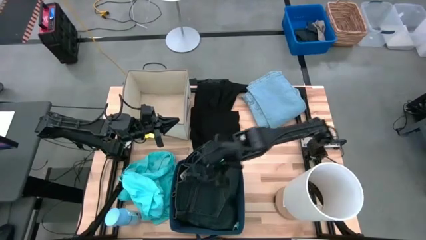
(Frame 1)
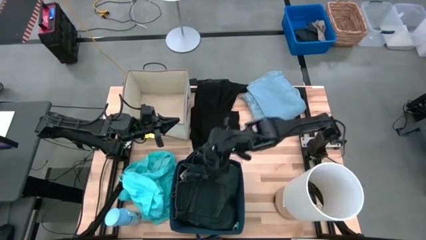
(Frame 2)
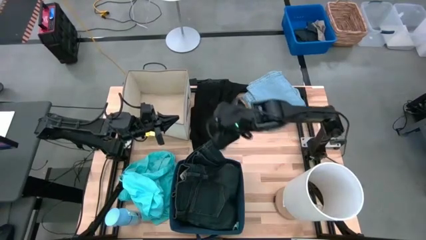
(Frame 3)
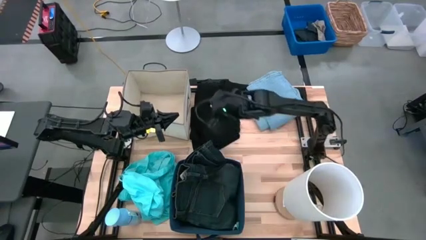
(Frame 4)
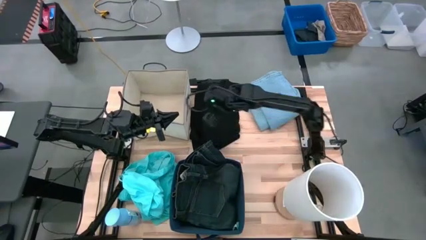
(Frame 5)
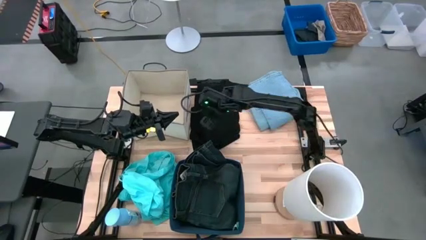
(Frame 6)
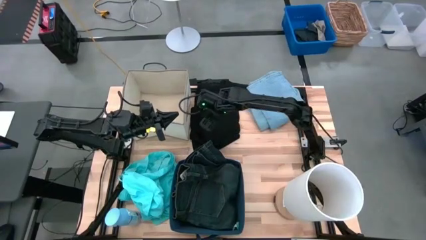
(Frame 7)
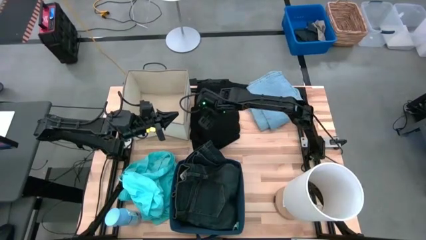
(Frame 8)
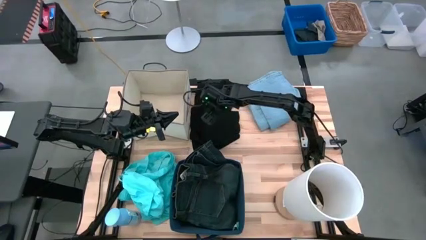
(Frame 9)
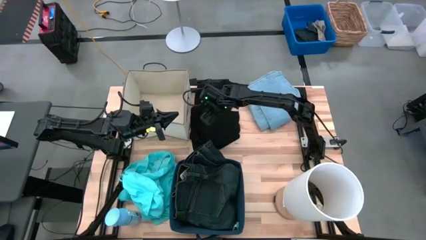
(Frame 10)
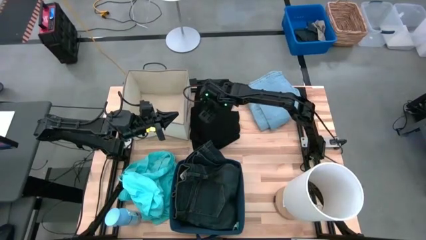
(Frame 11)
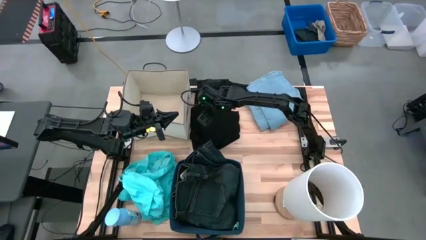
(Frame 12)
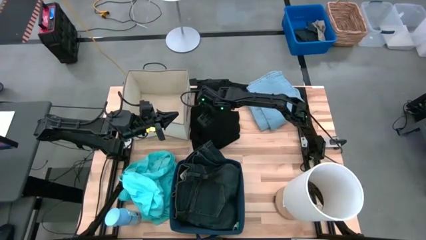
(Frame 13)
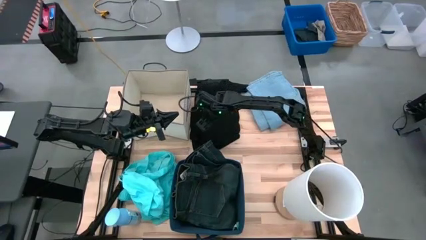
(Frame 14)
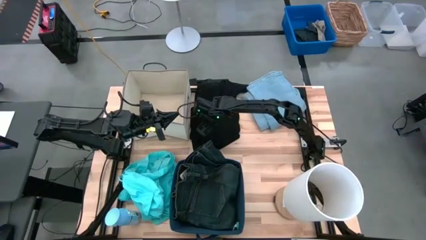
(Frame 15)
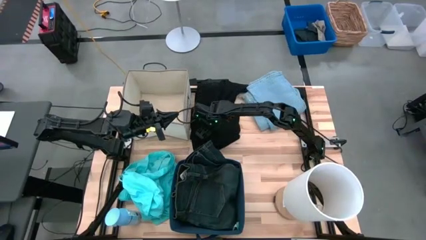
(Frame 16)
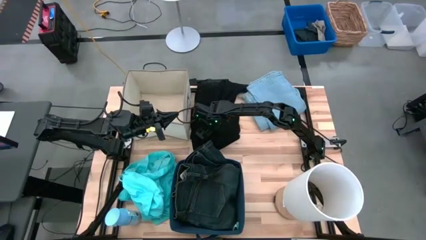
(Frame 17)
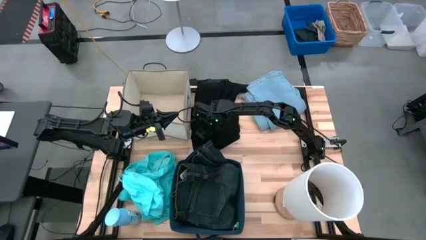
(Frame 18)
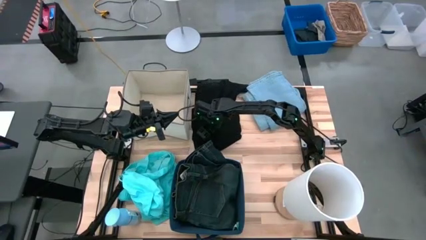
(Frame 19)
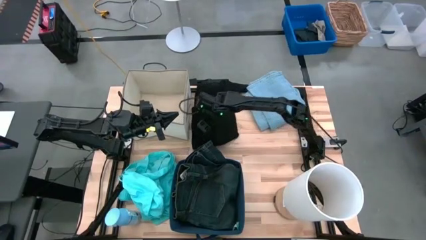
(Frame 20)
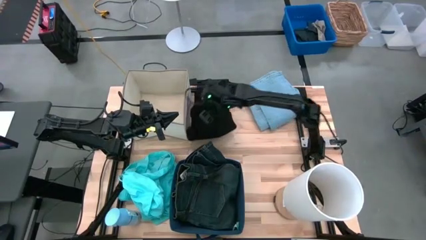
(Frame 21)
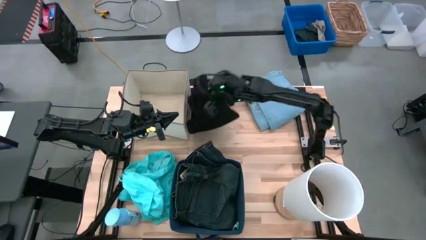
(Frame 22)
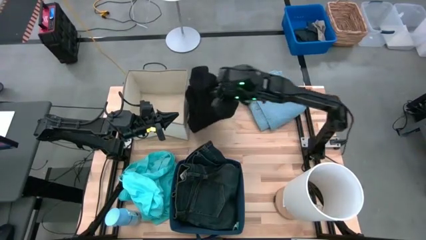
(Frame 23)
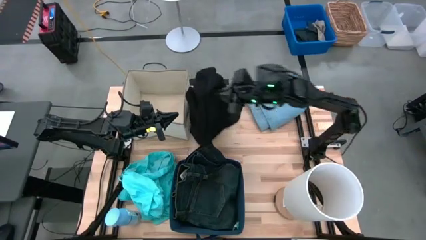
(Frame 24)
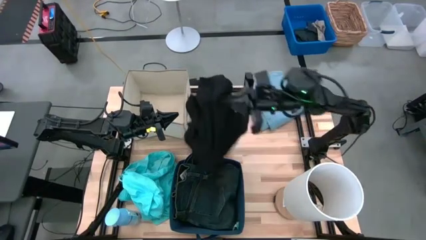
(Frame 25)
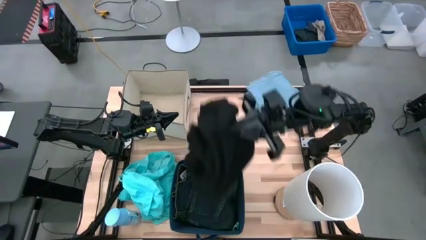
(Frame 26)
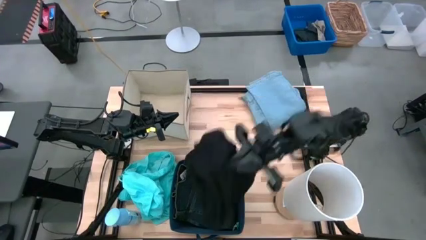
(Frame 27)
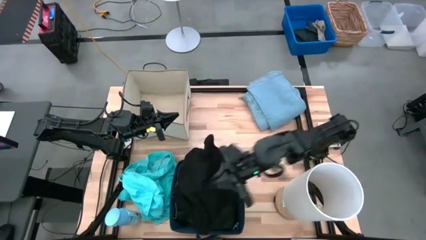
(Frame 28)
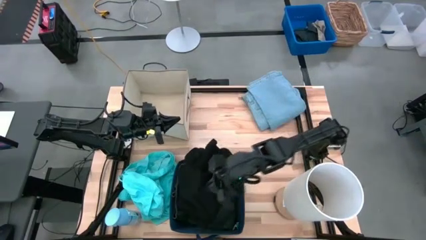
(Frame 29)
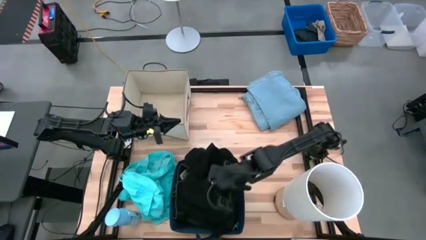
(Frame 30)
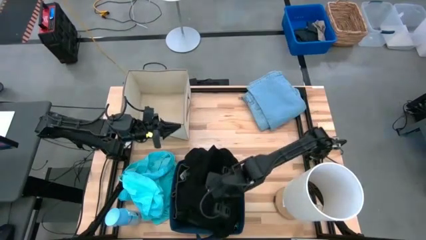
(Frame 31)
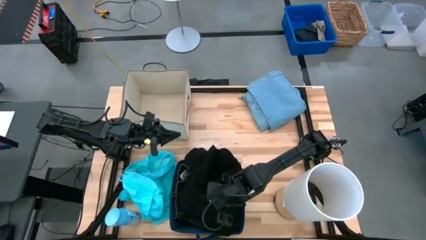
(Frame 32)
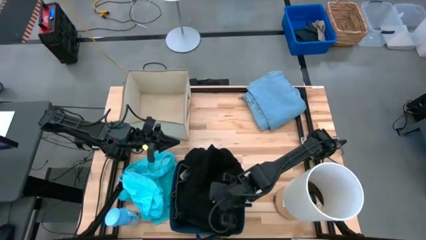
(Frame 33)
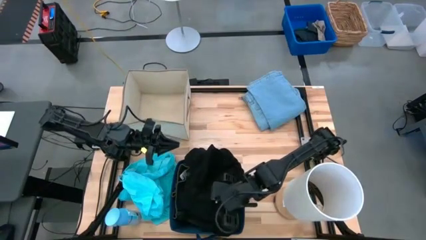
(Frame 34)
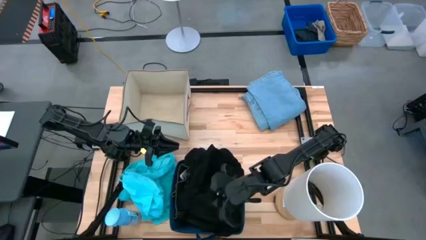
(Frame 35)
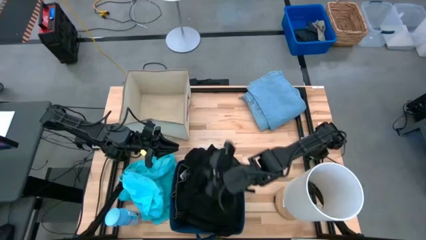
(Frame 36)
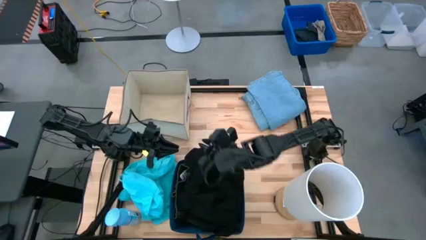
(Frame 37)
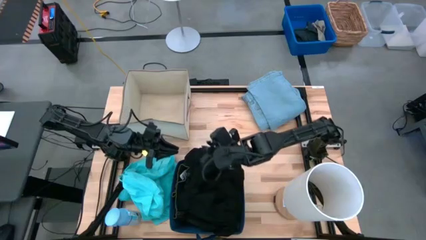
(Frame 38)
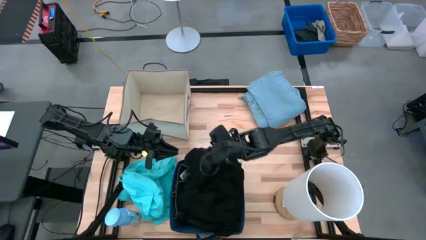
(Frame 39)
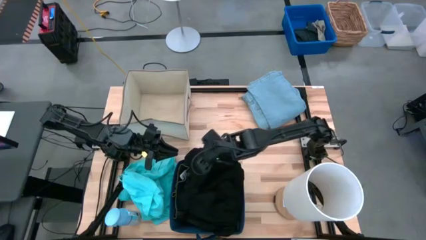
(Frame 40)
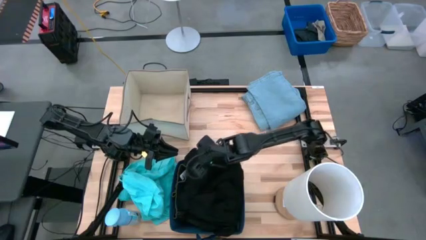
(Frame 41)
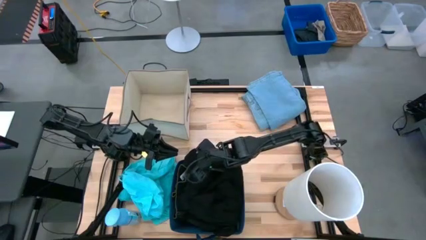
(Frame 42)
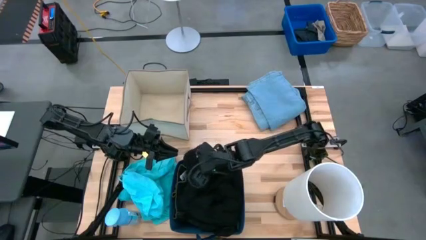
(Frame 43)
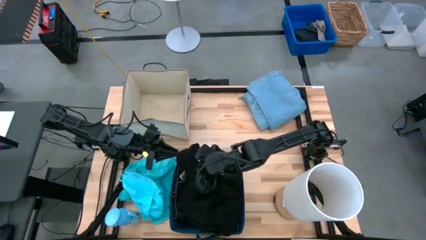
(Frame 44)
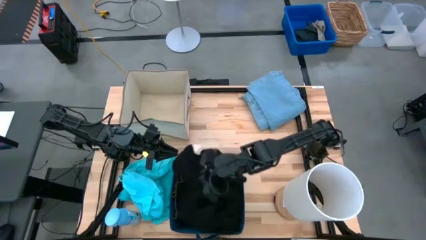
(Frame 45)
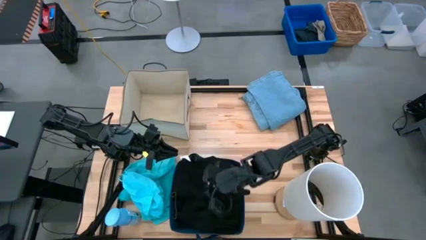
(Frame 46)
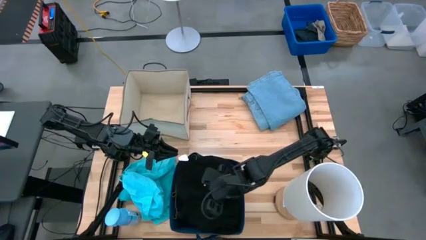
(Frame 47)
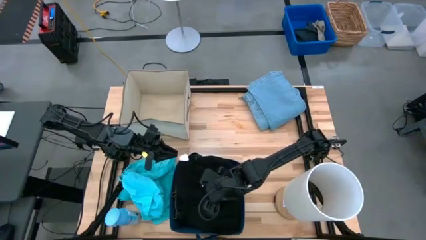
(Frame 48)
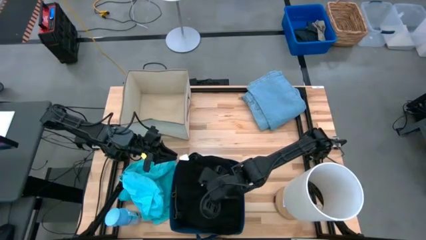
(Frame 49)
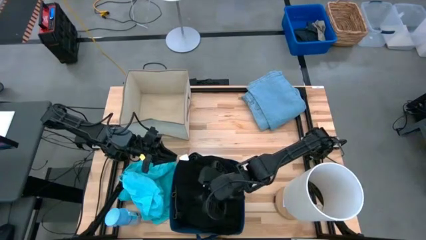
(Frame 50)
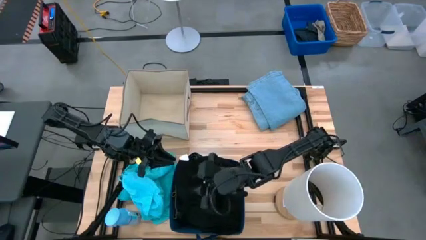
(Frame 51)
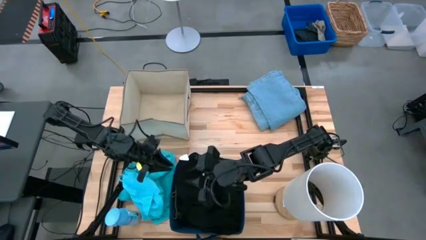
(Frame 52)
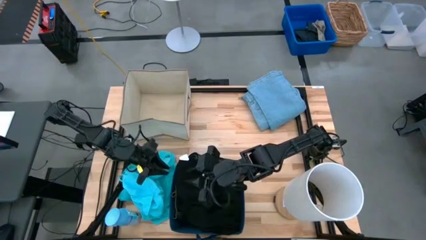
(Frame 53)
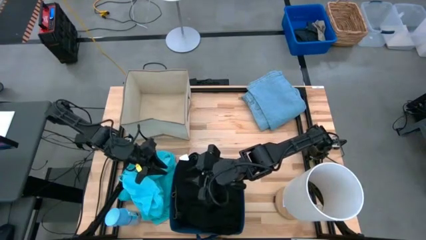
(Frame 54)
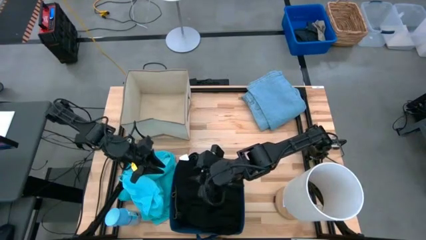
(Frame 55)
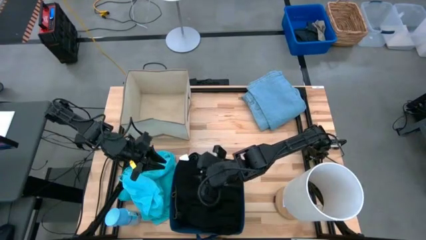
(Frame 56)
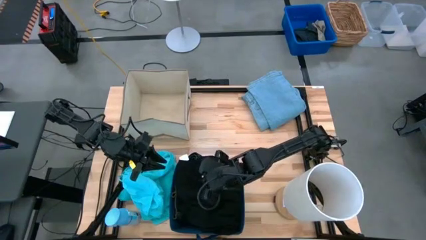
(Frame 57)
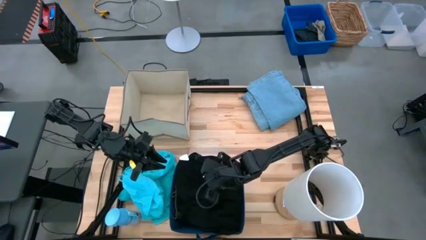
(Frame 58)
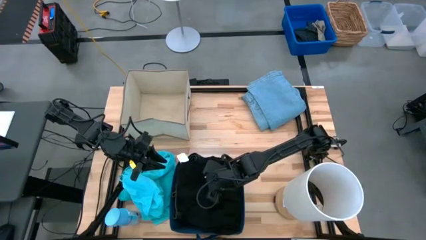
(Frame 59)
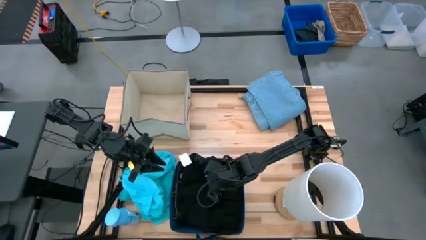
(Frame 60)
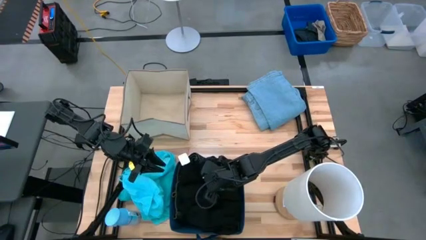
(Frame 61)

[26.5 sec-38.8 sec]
Task: Sort clothes
Put the black shirt into the blue laundry bin

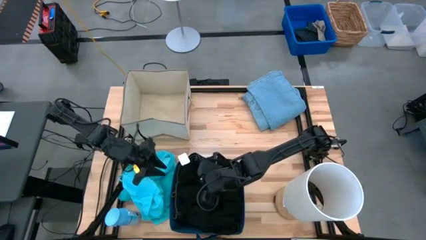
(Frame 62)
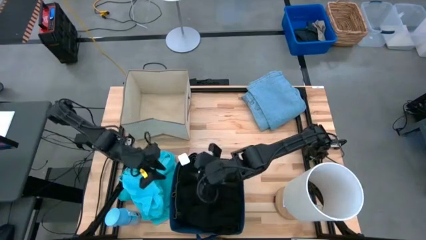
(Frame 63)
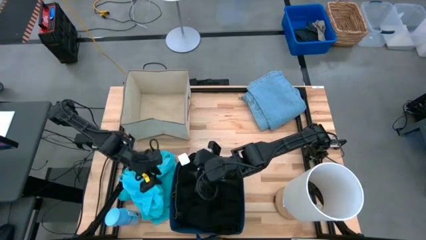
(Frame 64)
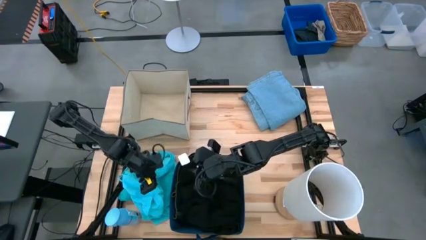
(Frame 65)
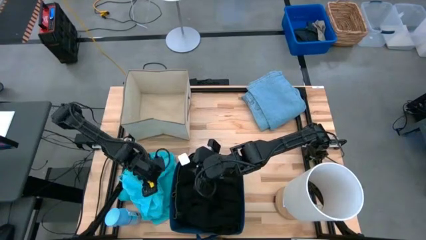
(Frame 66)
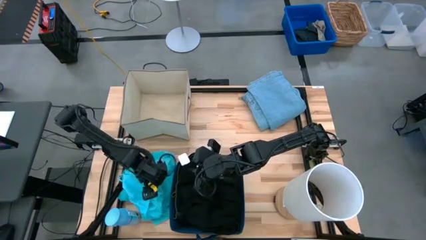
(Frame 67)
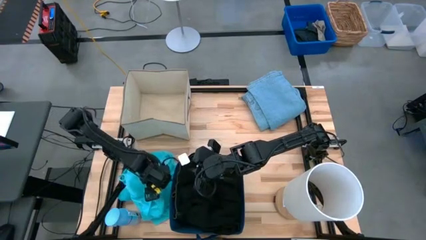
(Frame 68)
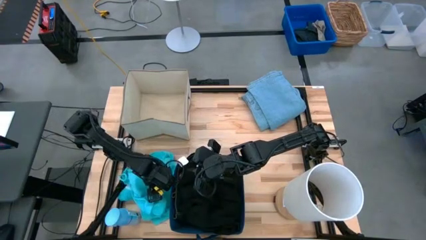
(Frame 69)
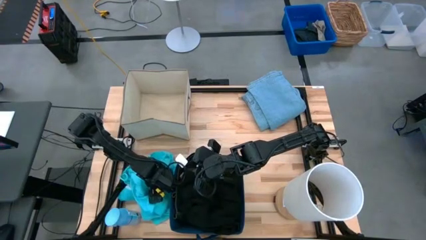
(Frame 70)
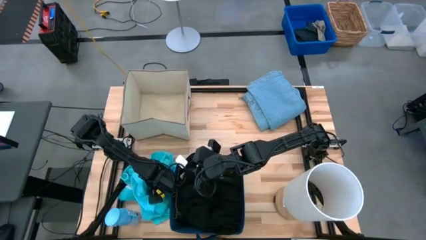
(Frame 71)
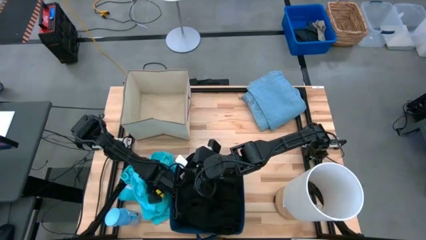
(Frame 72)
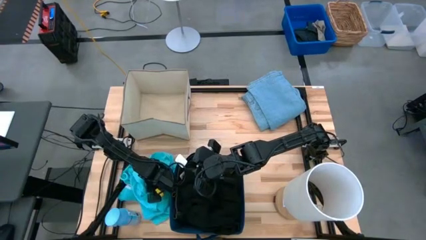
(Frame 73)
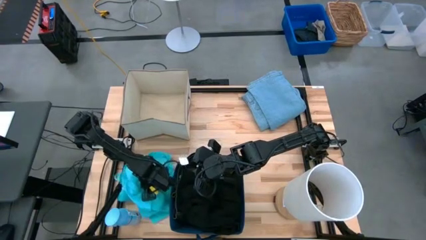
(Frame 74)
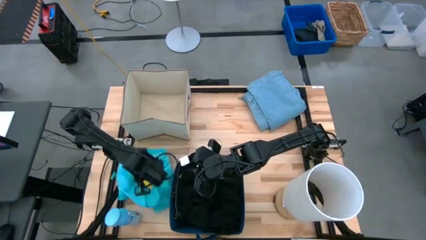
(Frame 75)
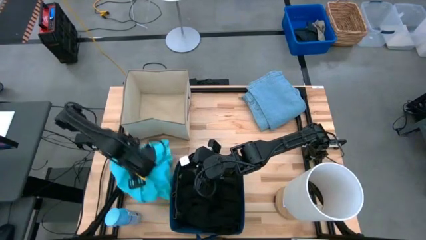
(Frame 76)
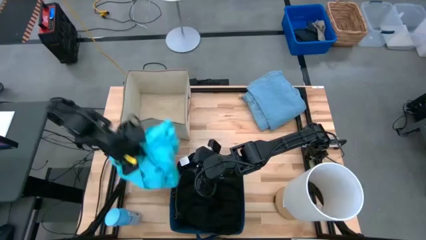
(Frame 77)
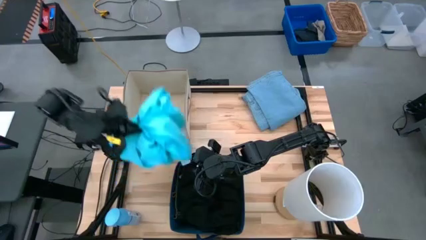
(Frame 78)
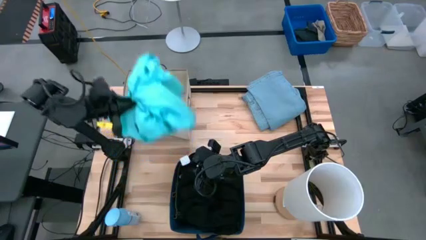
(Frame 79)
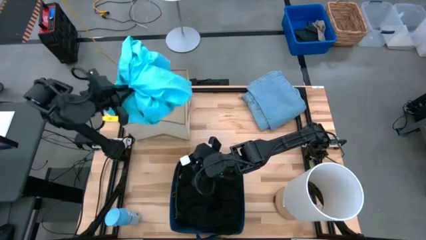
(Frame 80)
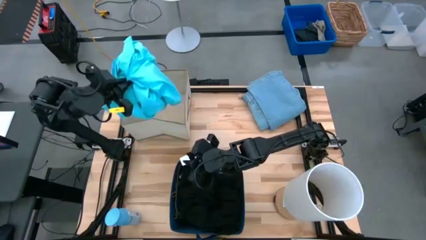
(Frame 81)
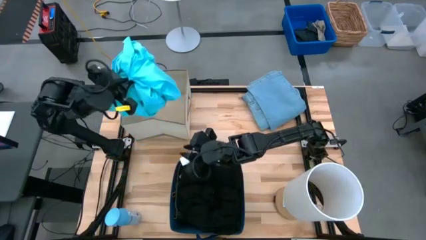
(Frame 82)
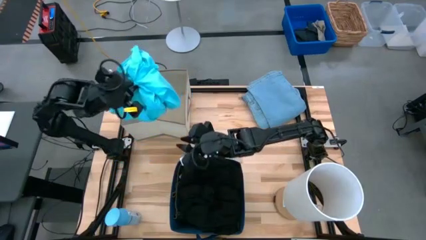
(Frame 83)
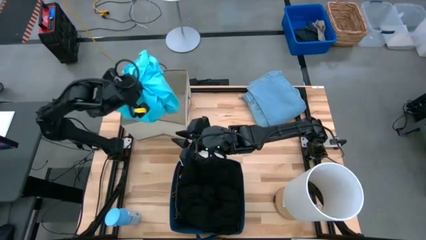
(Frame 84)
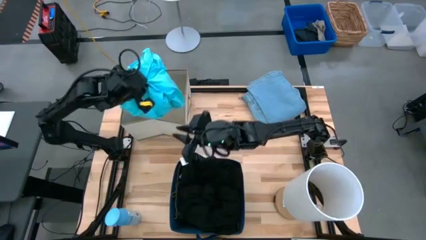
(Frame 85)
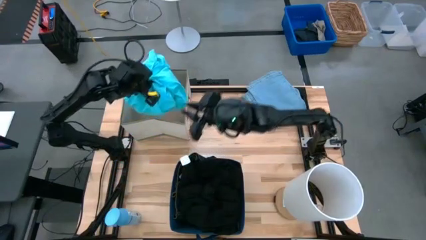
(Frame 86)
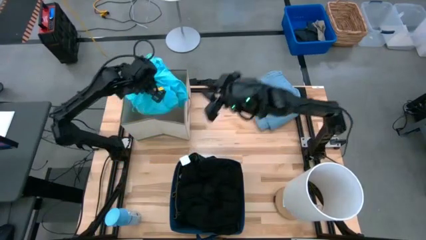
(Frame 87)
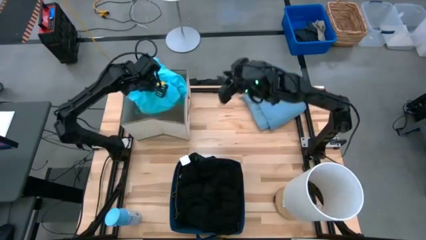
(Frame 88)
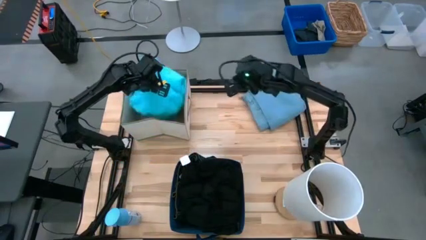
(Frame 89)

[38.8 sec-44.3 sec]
Put the blue shorts into the white laundry organizer
